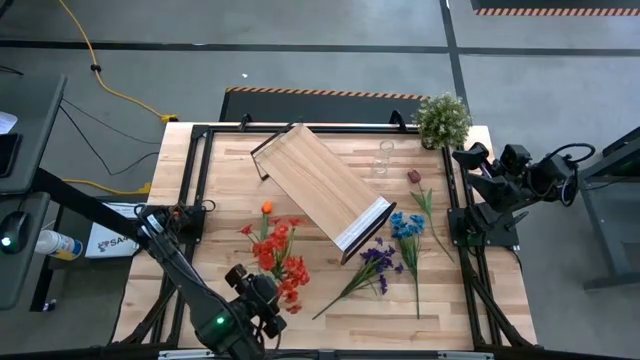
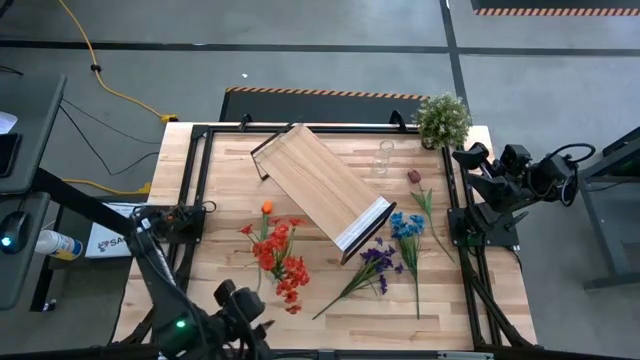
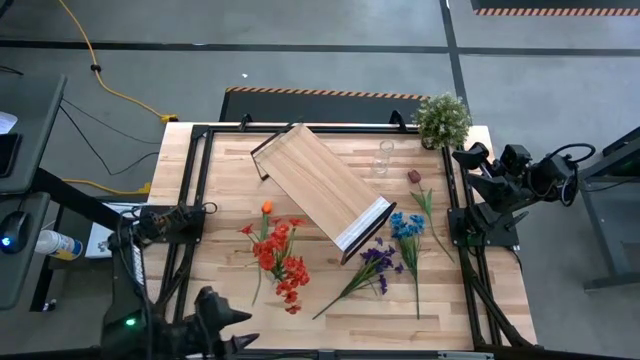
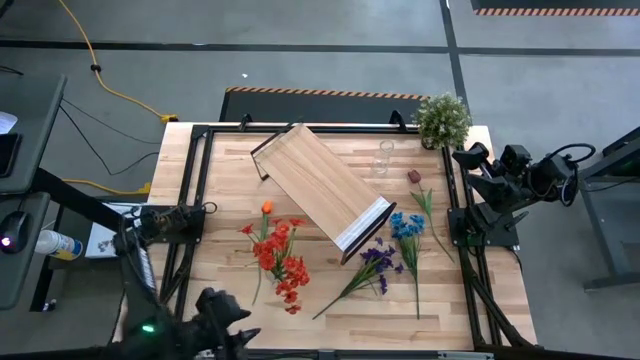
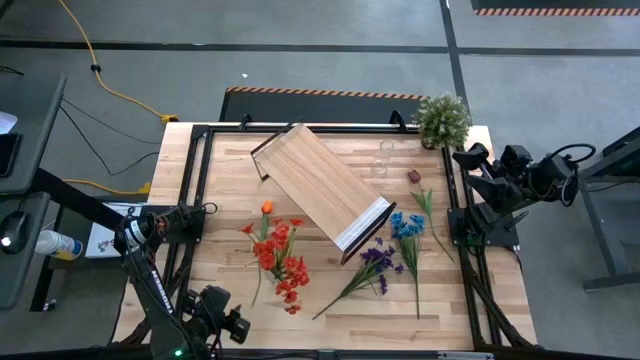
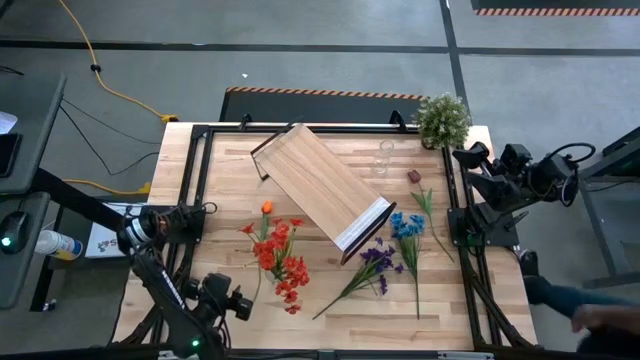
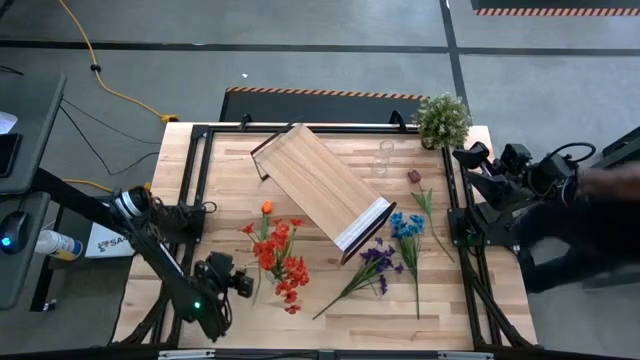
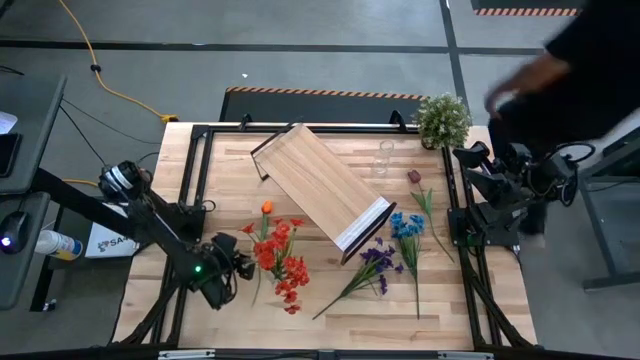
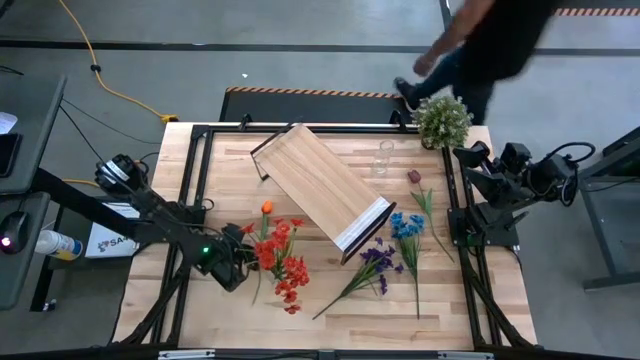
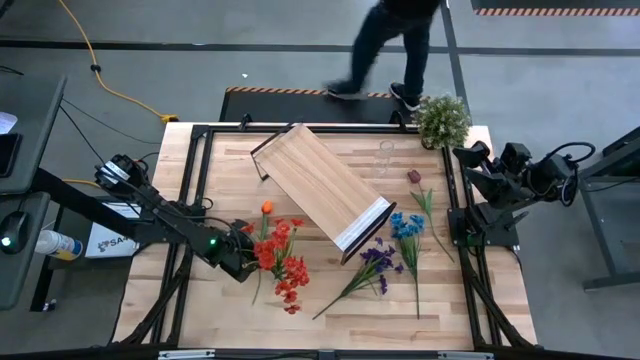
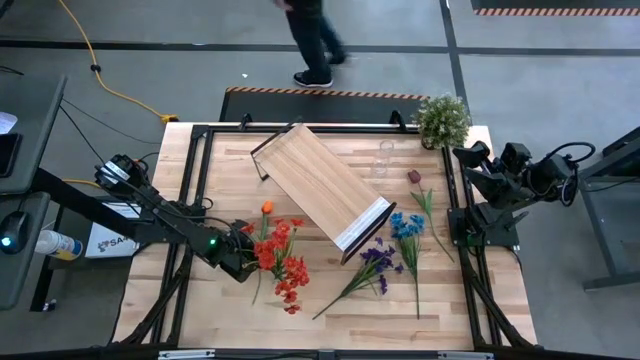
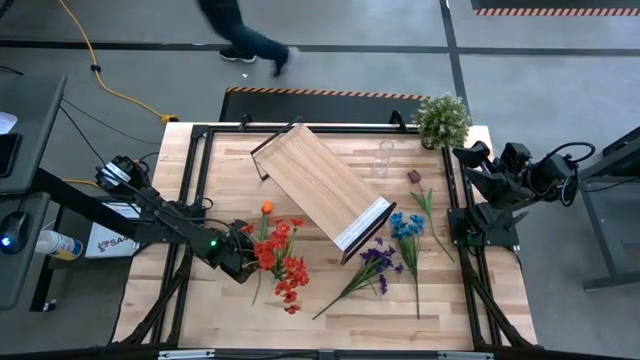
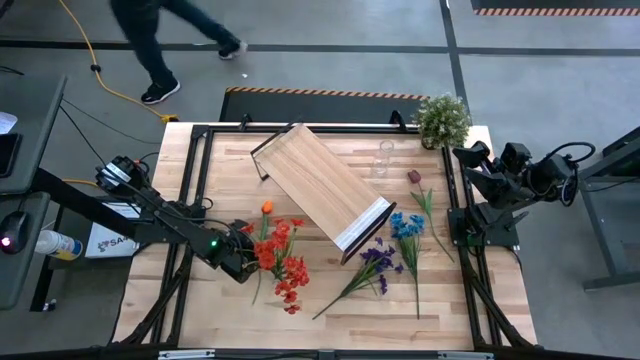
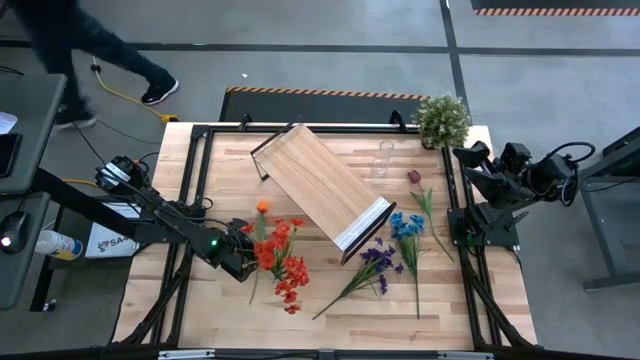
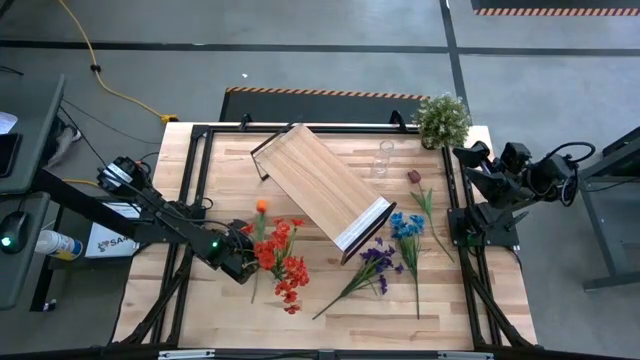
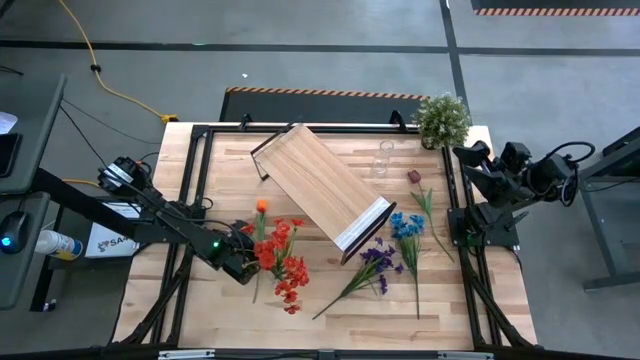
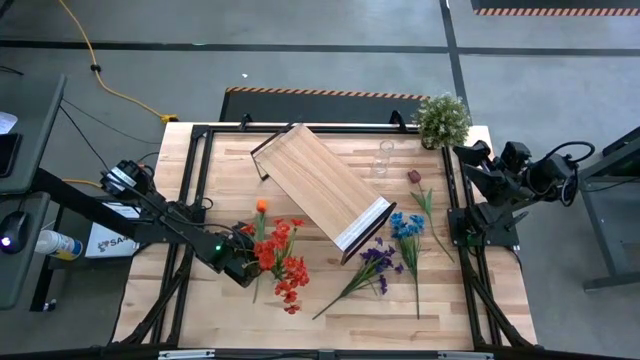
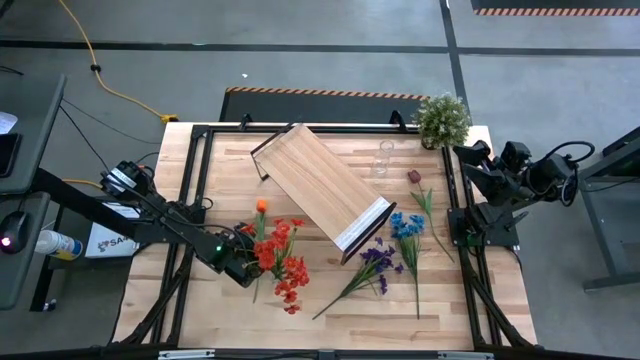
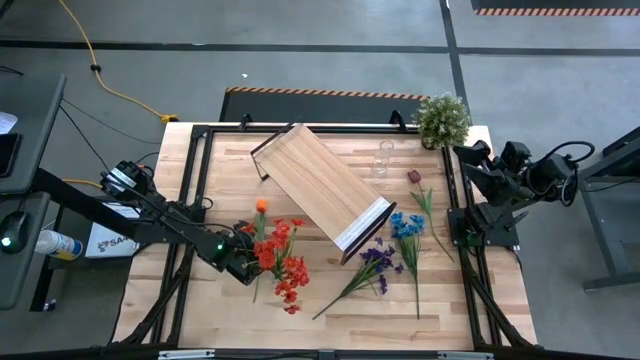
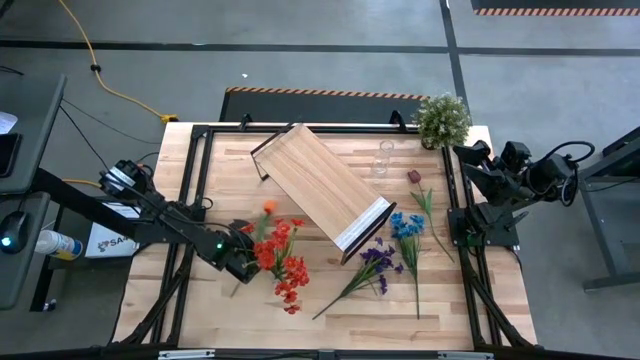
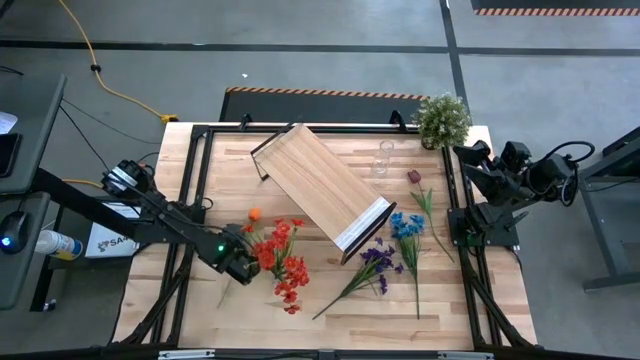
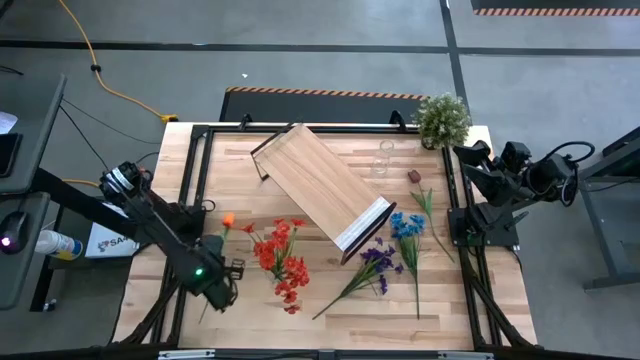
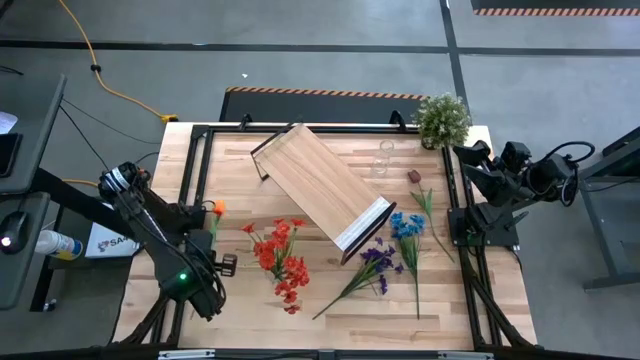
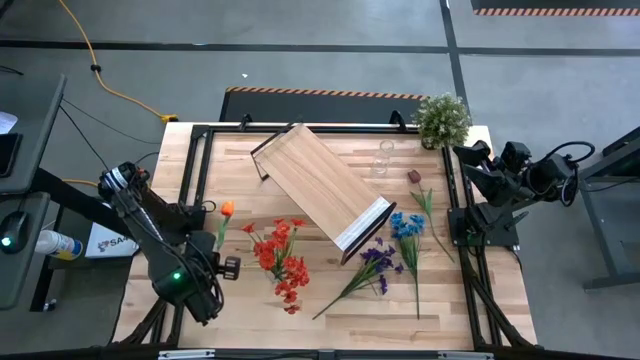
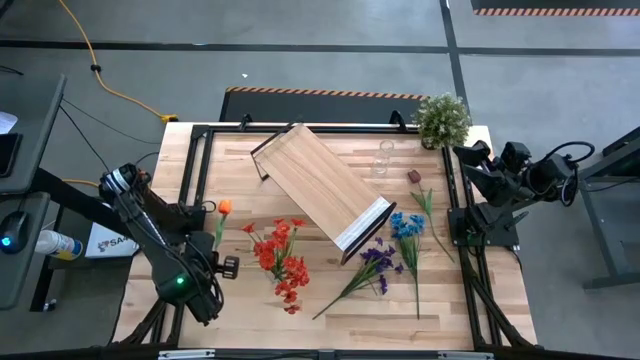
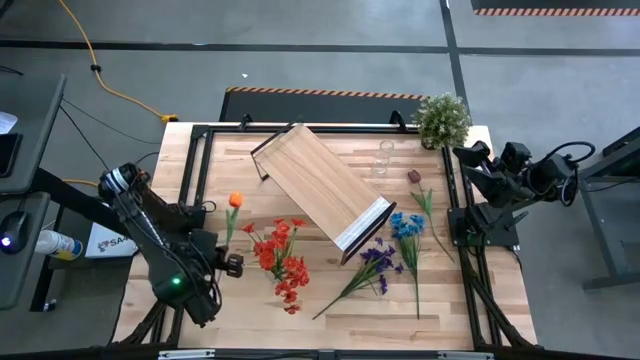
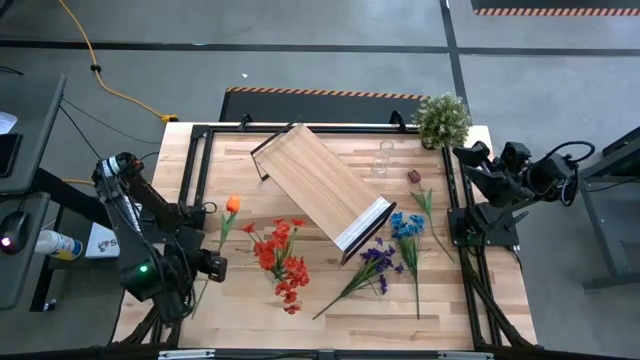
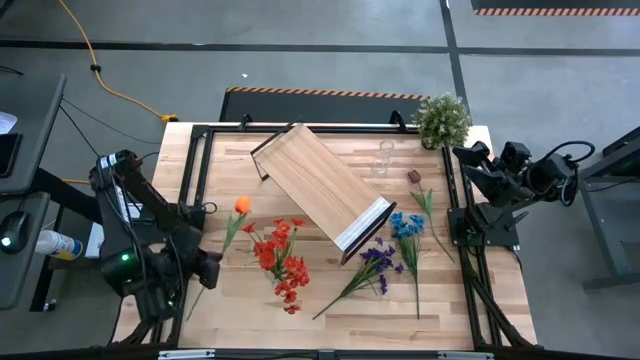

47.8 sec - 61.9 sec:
Task: Pick and place flowers into a vace then onto a shelf
Put the orange tulip into the bottom transparent vase

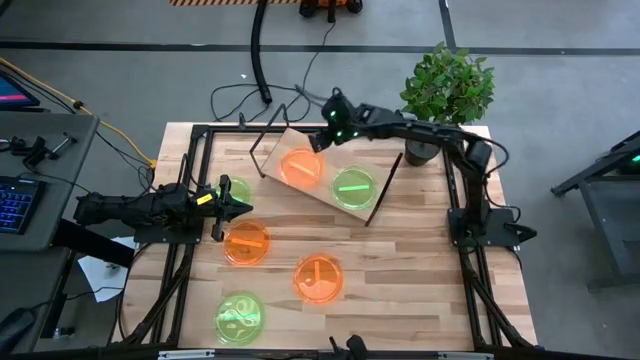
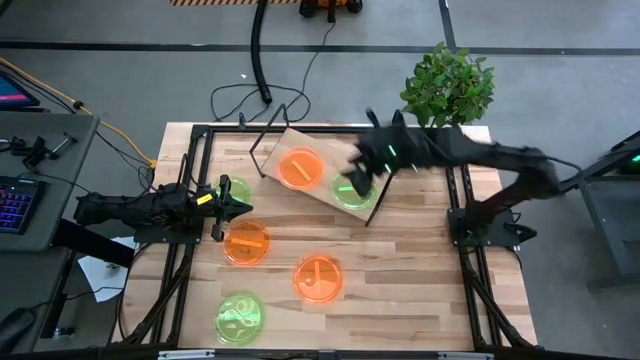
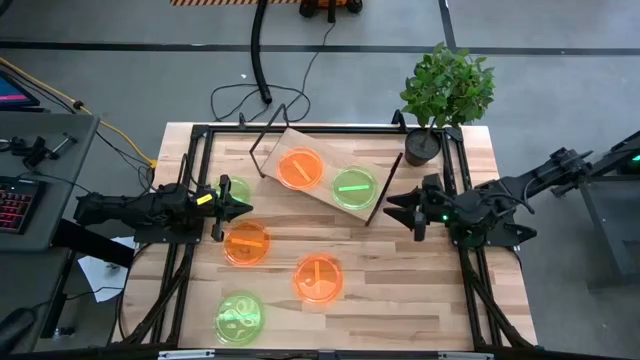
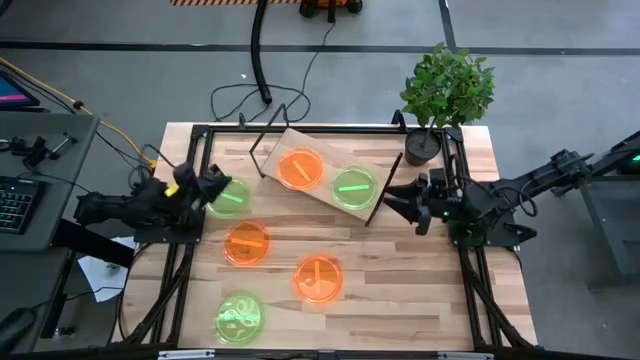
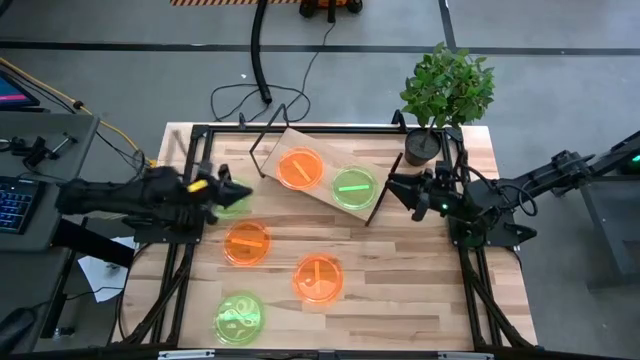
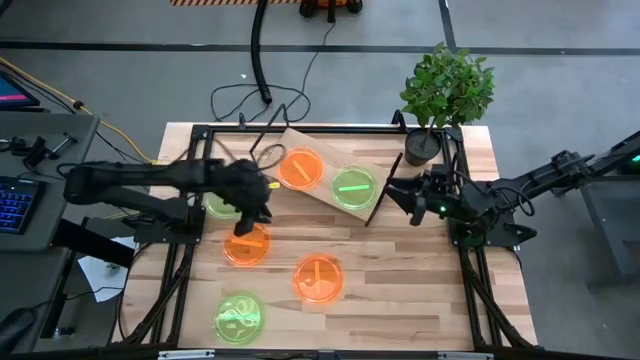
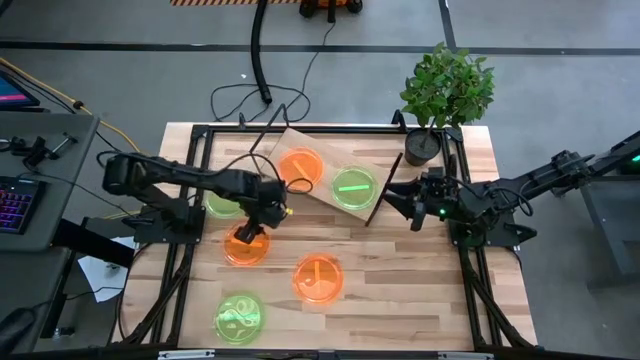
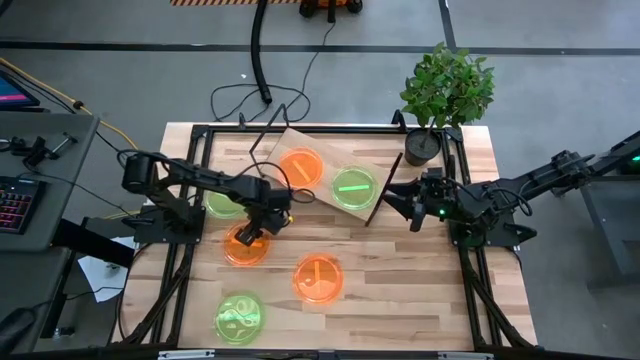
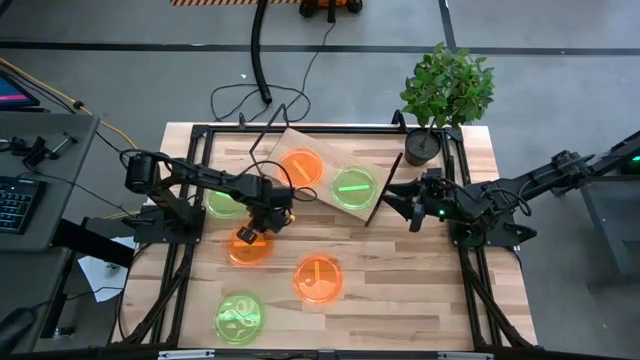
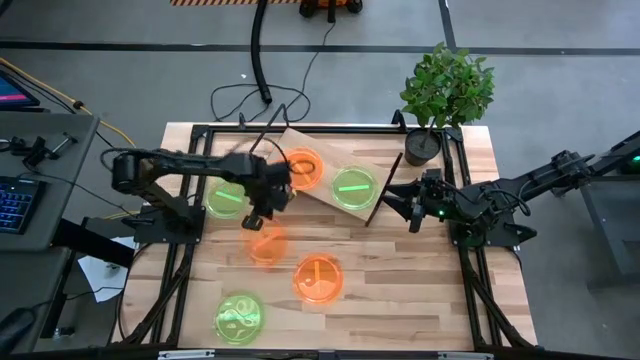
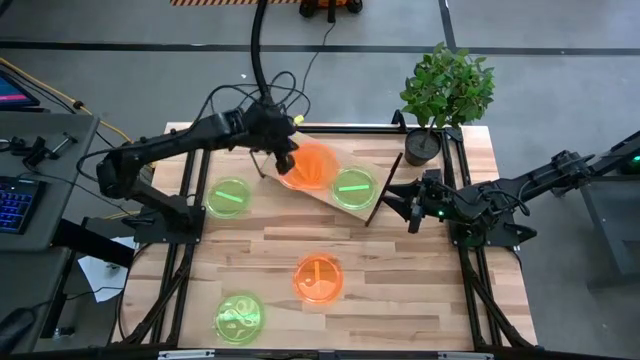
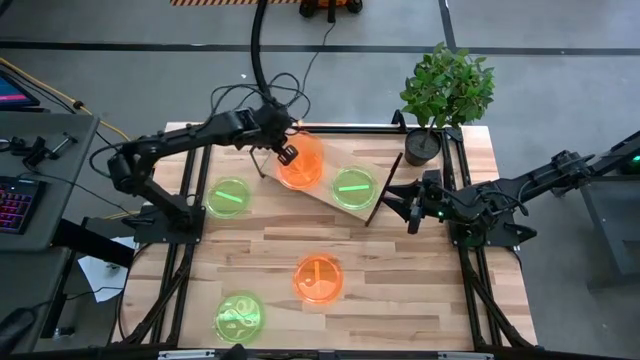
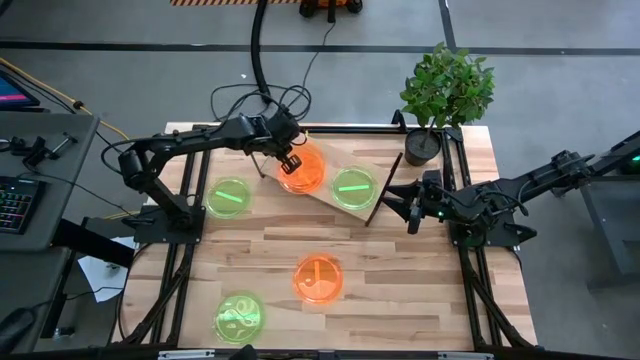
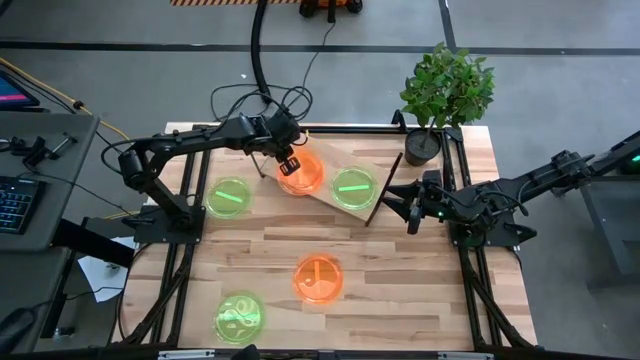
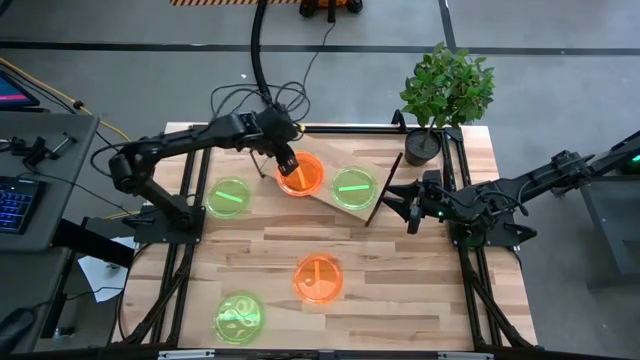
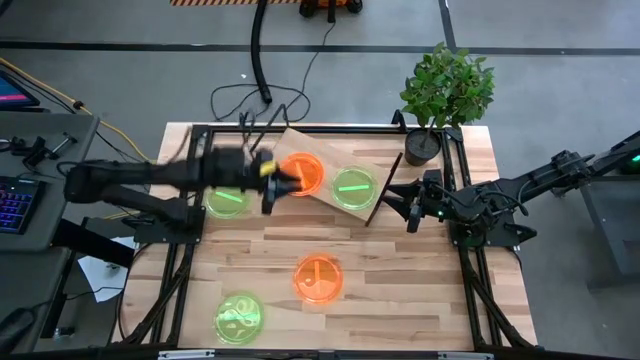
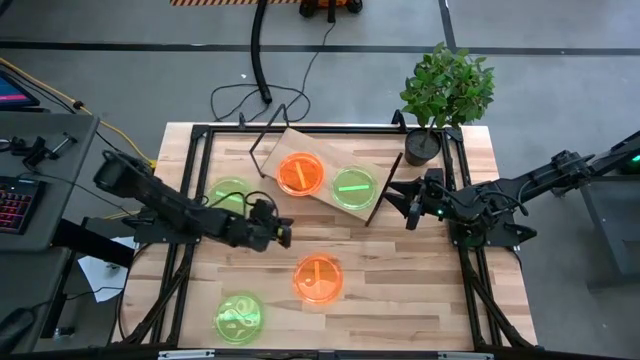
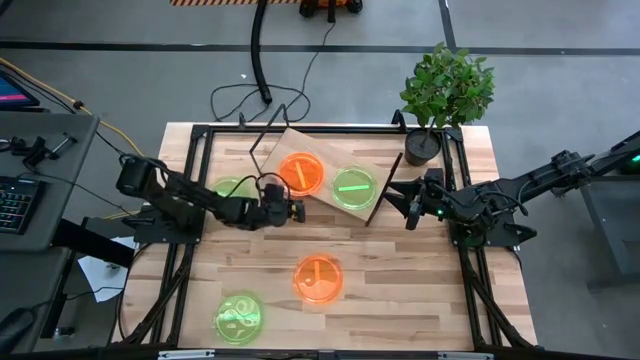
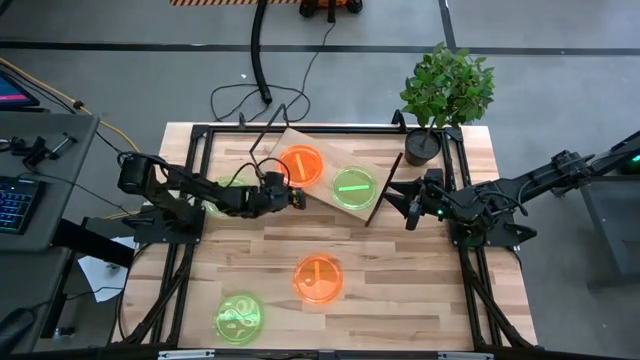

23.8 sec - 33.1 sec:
Task: Place and stack plates onto a shelf
Stack the left orange plate on top of the orange plate on the shelf
